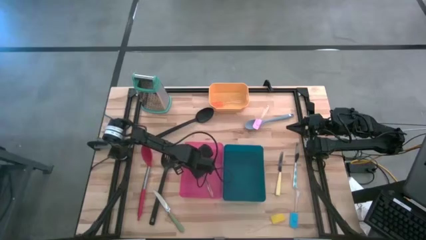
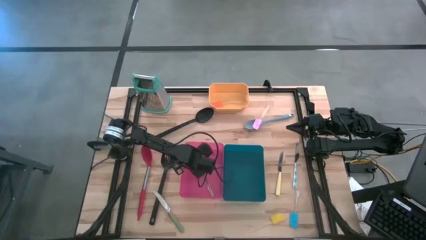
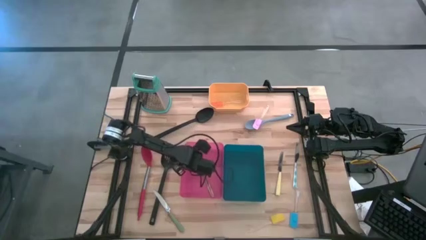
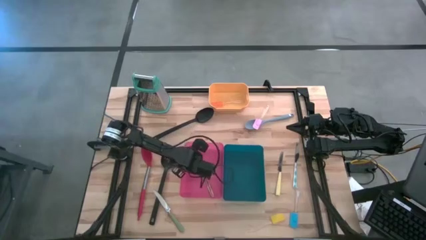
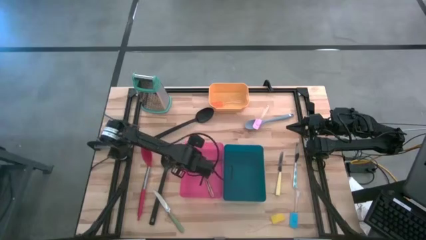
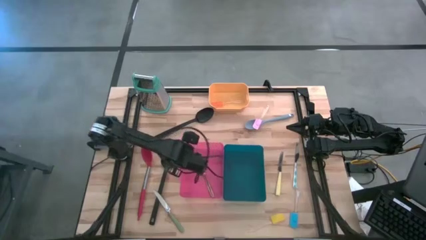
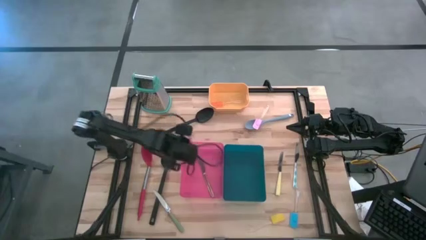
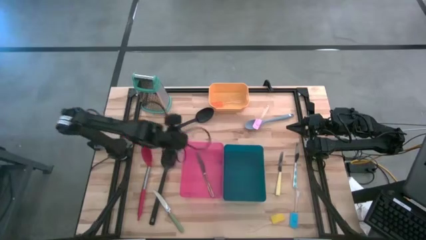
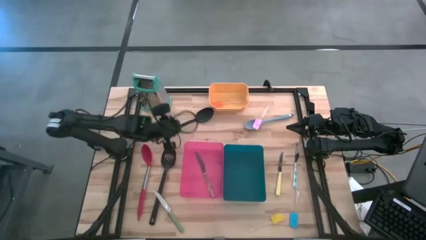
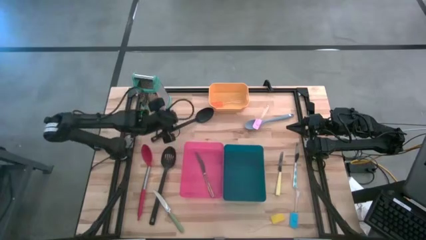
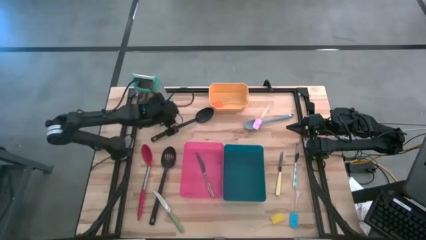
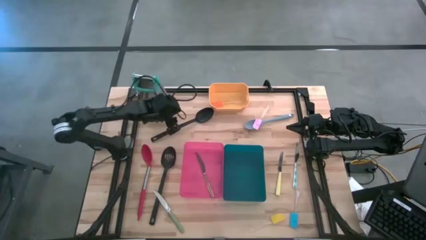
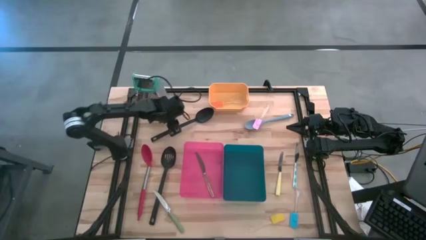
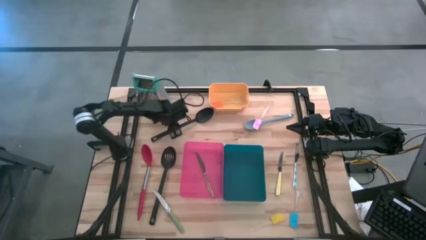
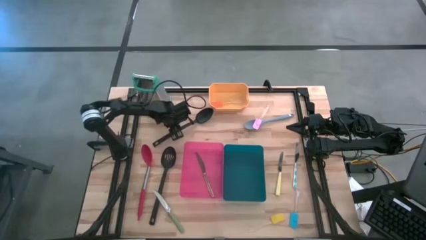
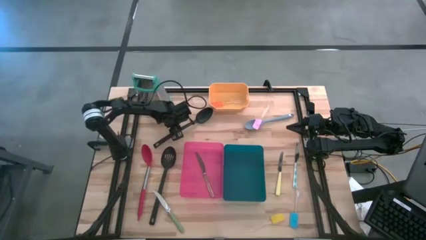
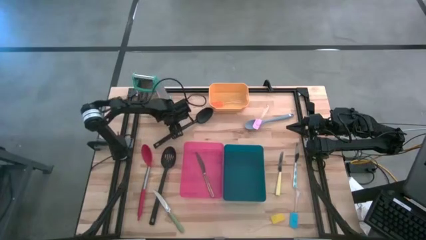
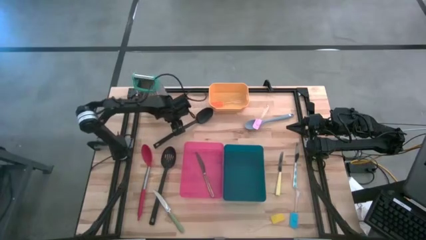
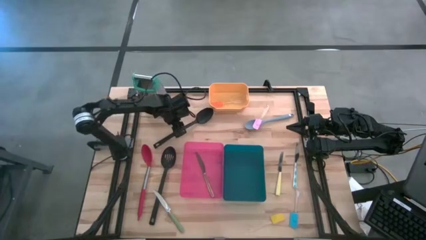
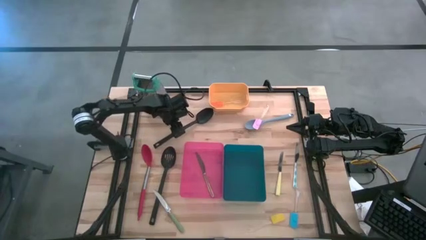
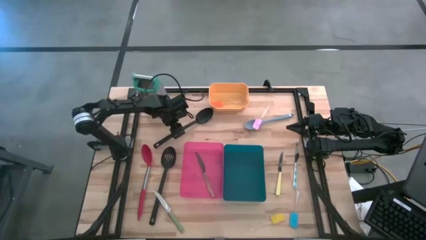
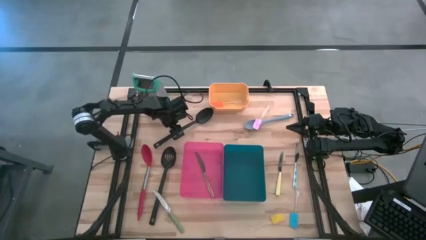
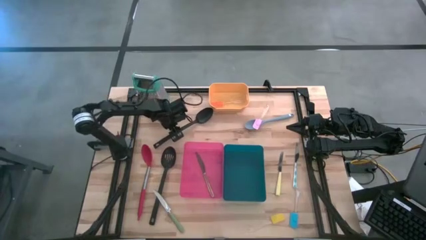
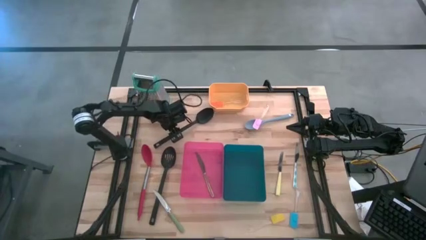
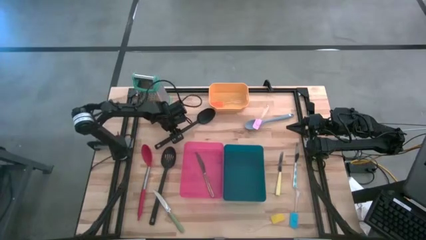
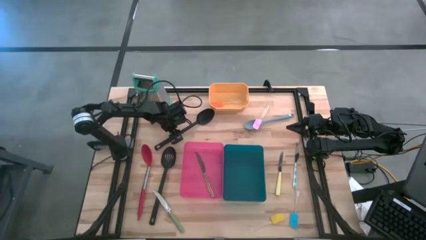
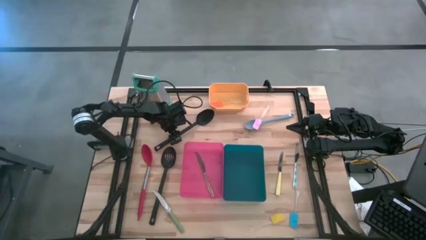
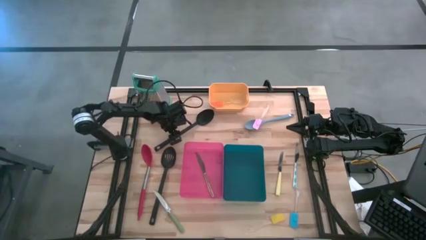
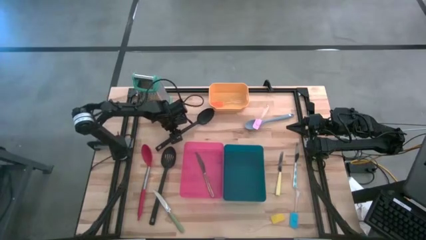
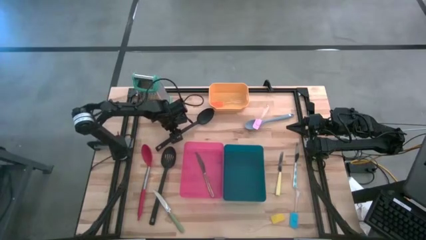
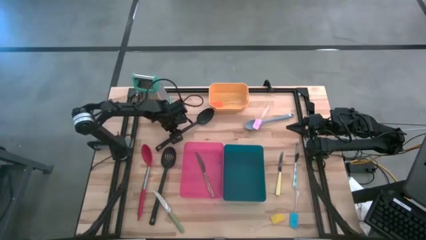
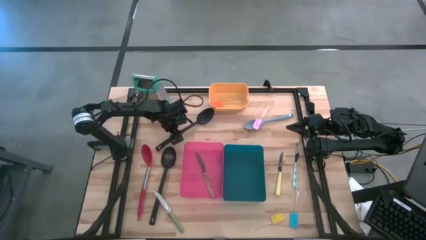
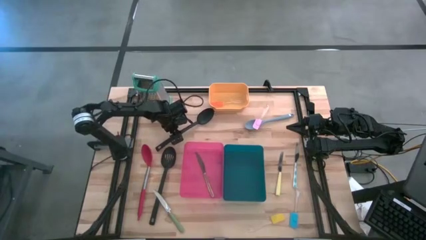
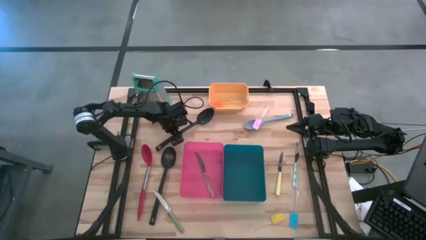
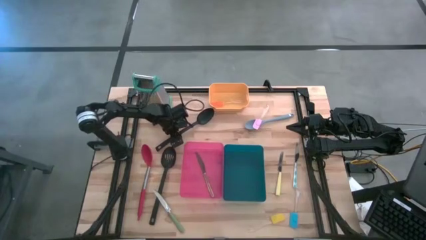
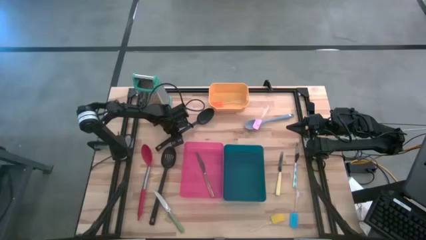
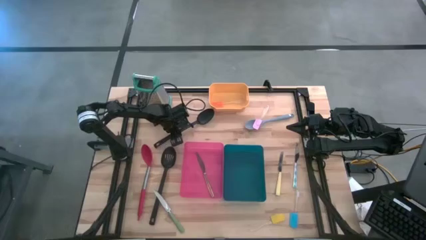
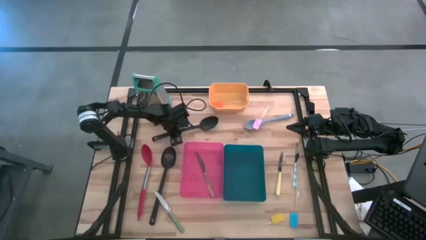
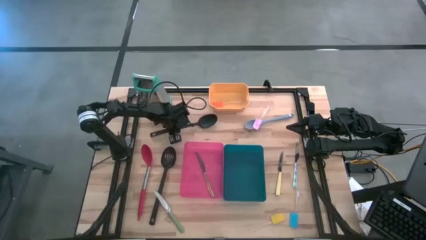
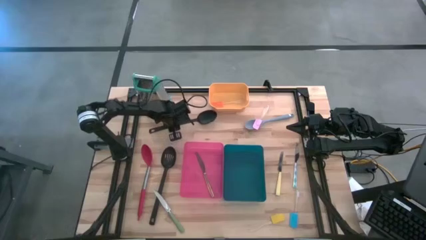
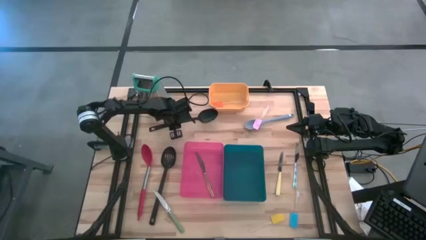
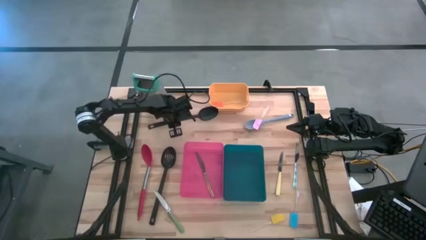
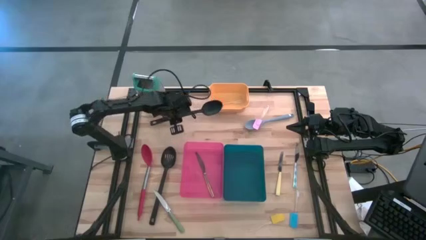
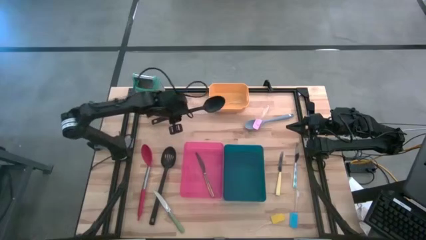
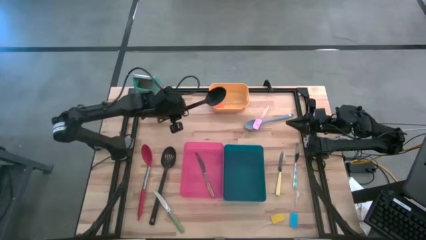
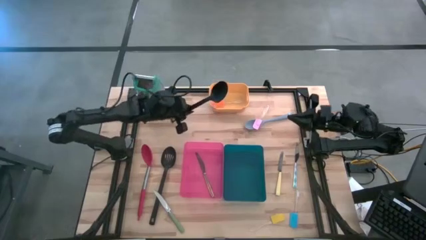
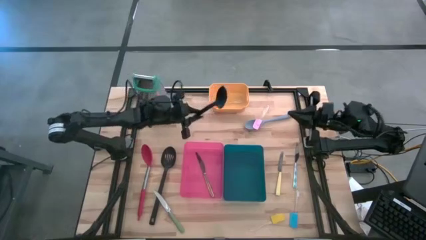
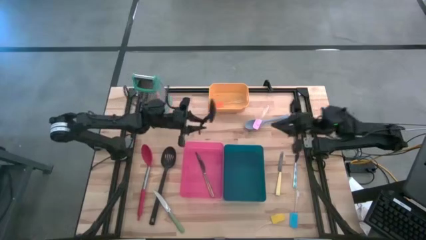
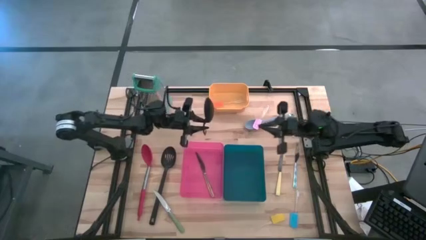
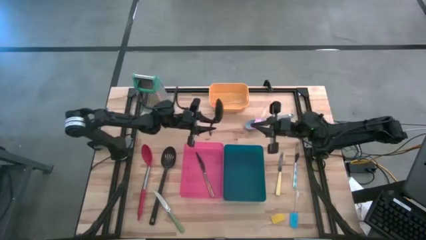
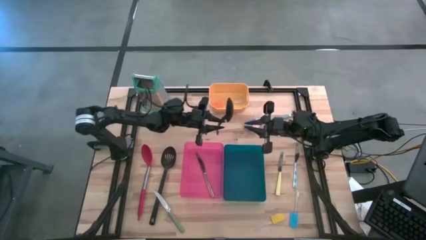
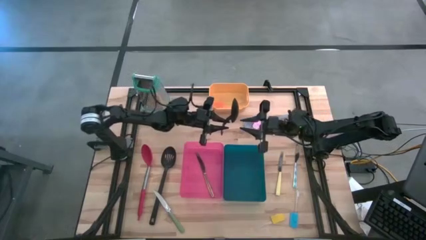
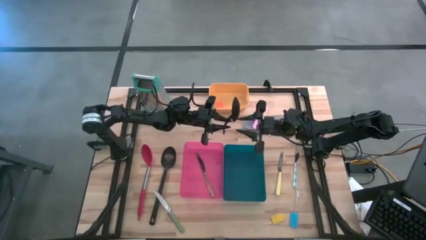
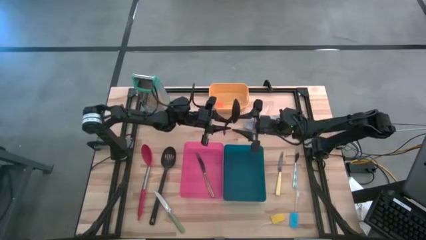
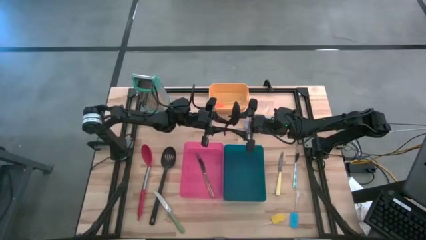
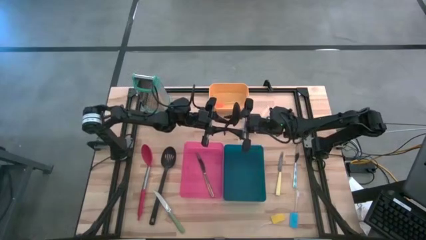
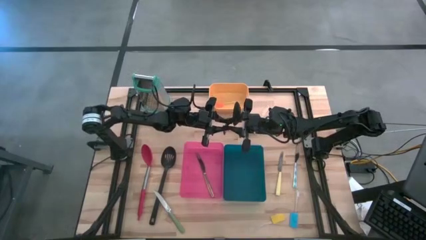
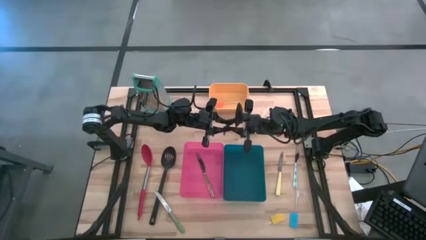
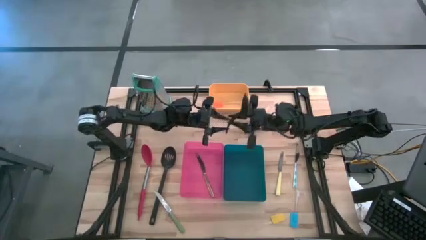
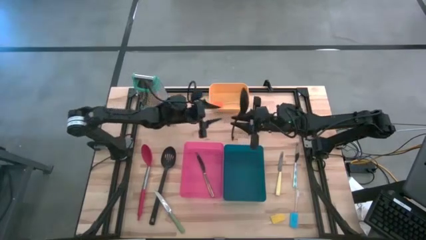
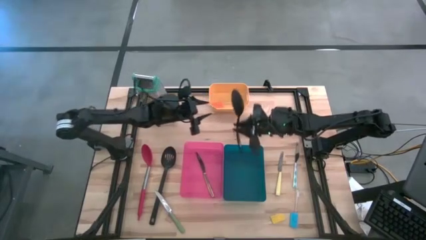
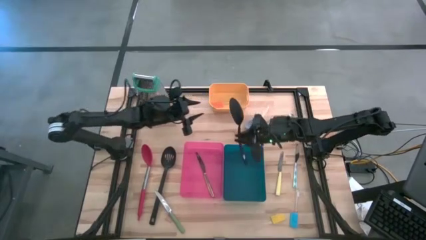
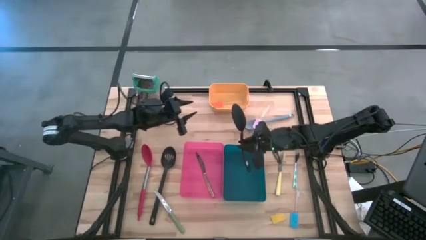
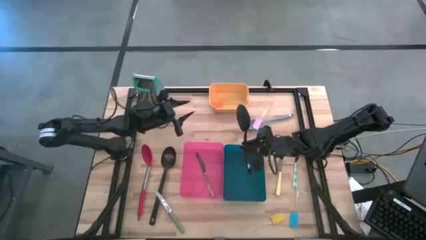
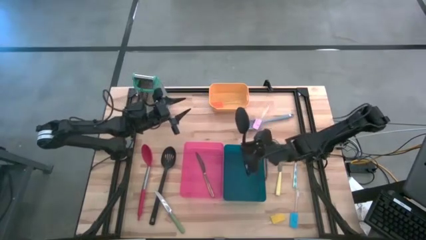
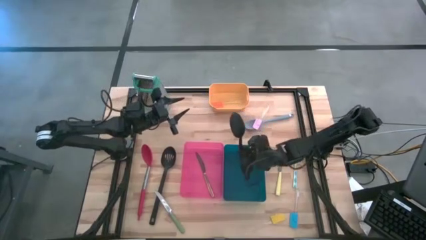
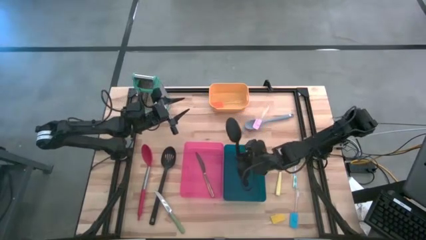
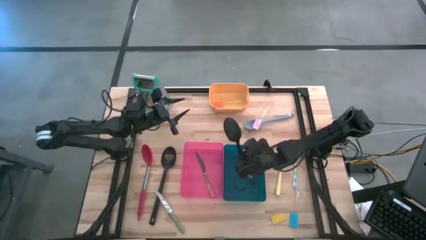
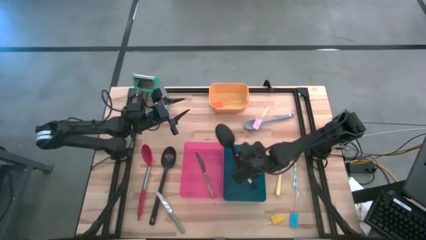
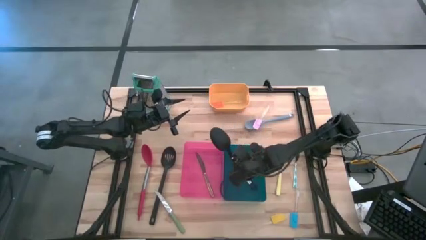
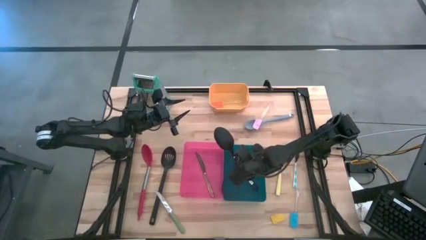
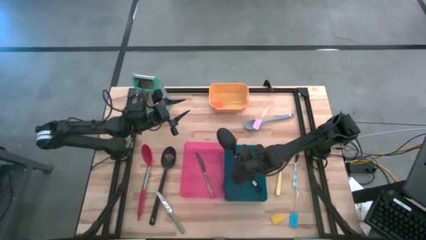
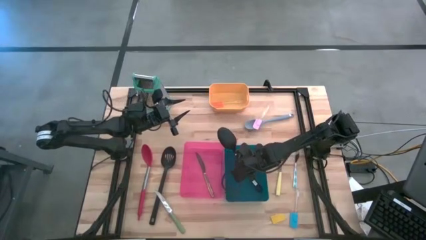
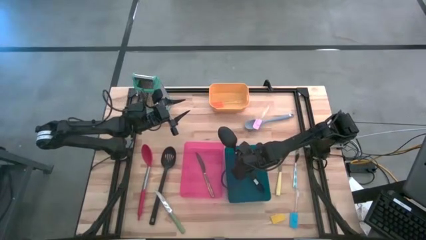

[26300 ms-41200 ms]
Task: Pick & Place Kitchen Items
Put the black spoon into the blue bin

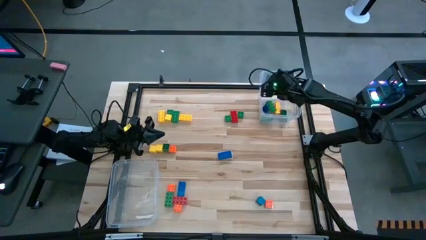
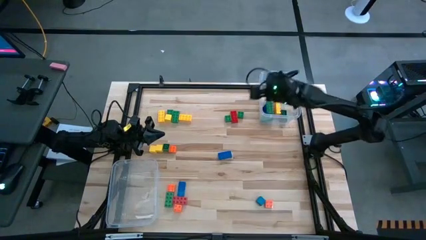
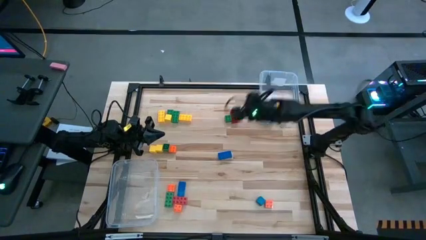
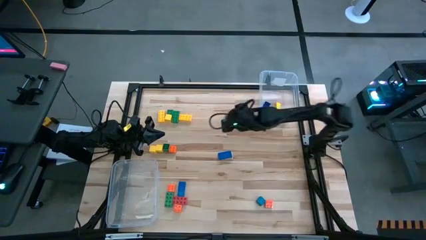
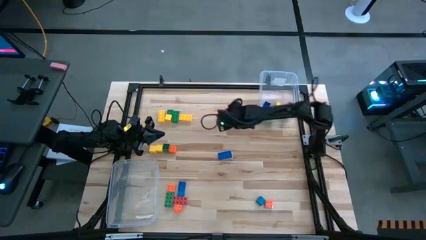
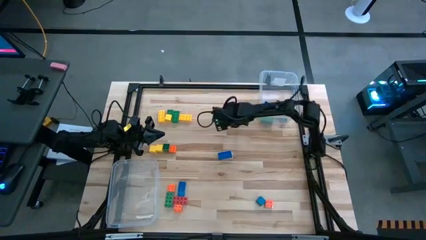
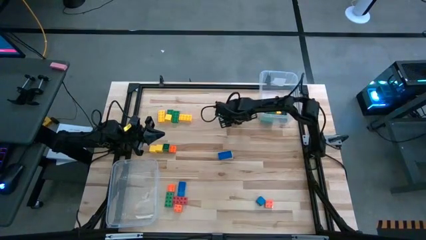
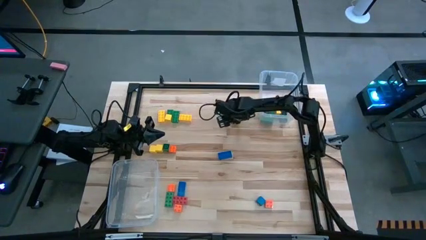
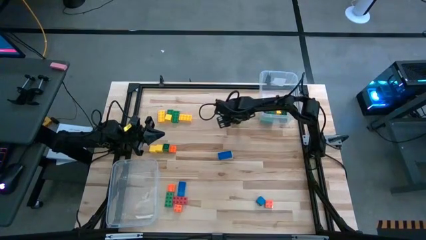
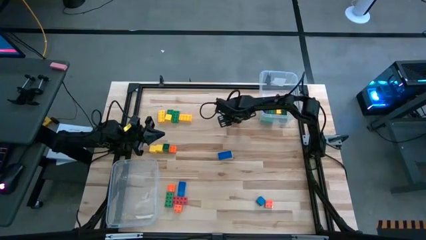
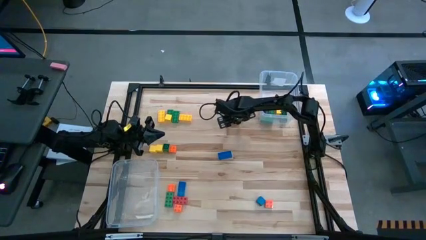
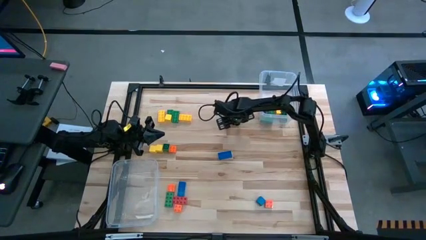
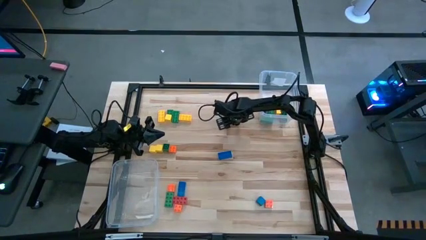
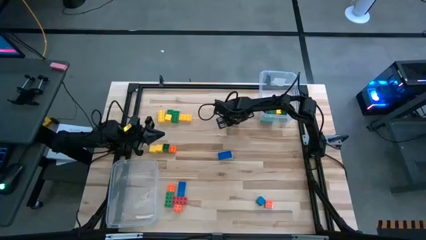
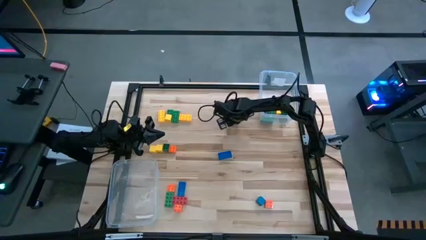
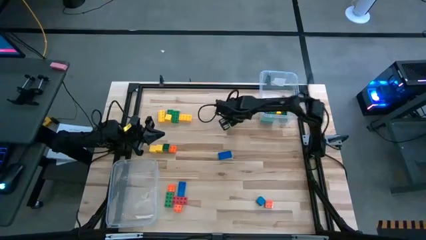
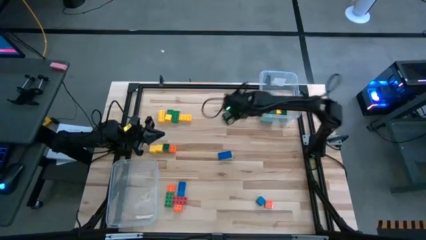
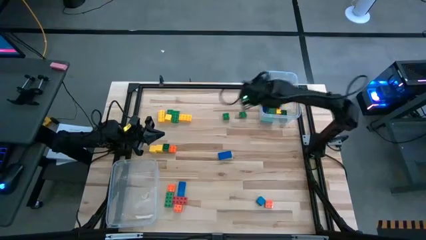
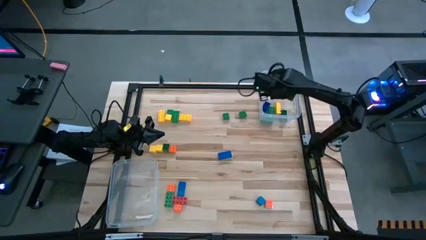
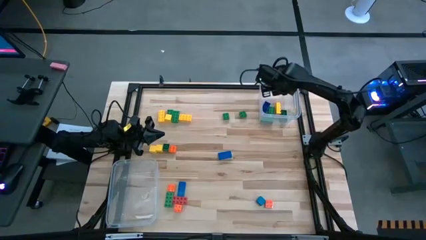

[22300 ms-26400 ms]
Task: Sort blocks by size
Put the top large red game piece into the right transparent bin
